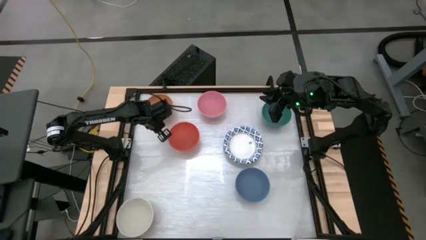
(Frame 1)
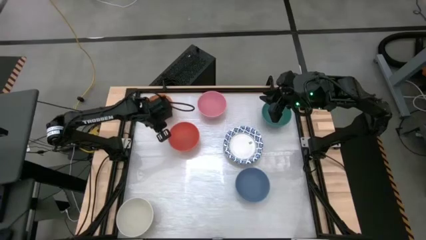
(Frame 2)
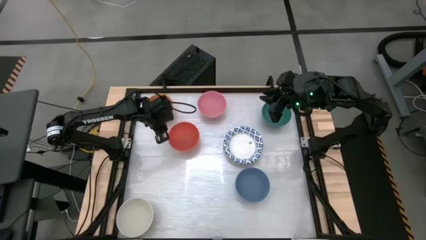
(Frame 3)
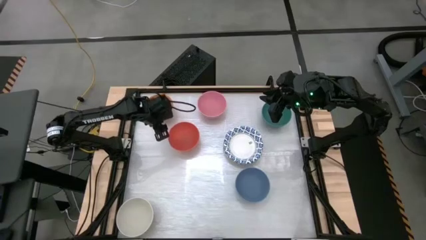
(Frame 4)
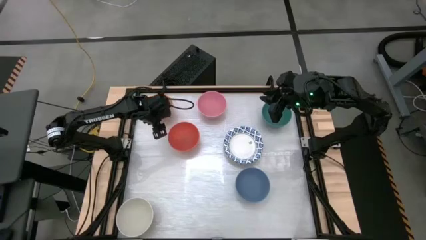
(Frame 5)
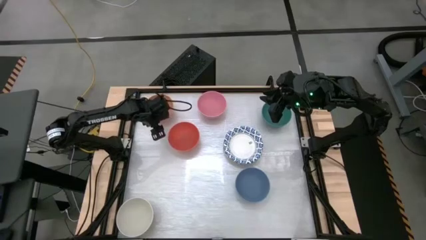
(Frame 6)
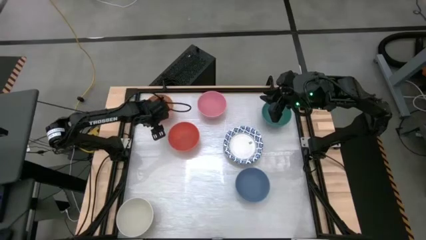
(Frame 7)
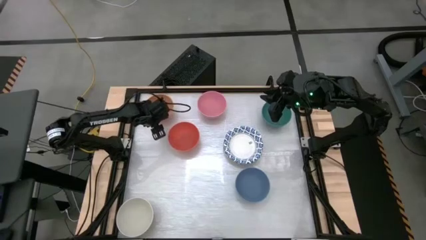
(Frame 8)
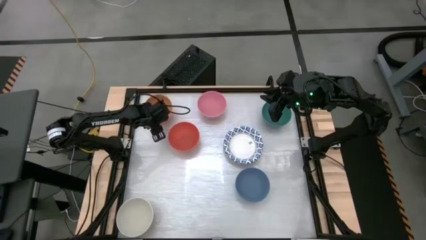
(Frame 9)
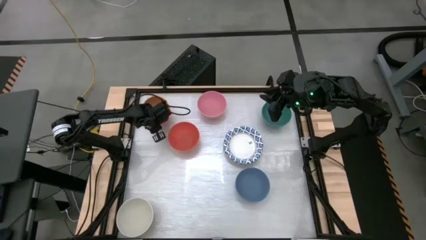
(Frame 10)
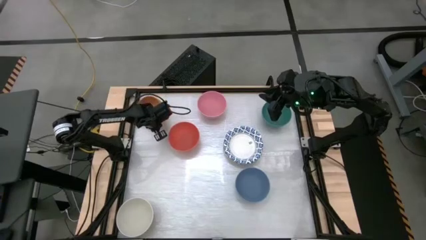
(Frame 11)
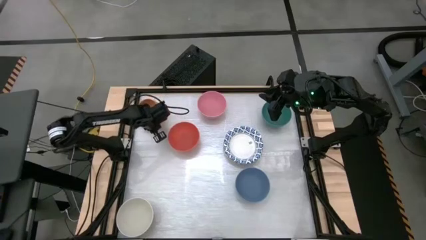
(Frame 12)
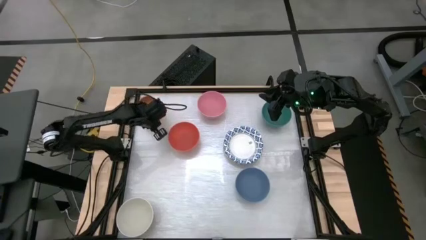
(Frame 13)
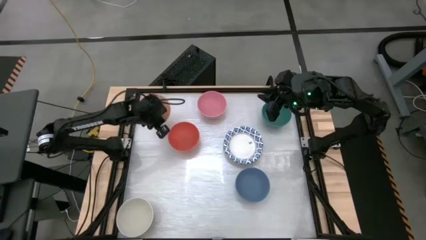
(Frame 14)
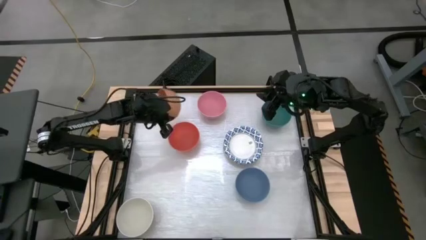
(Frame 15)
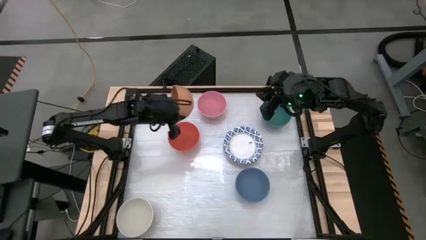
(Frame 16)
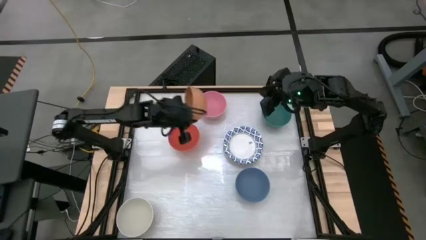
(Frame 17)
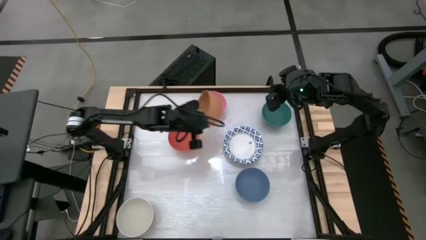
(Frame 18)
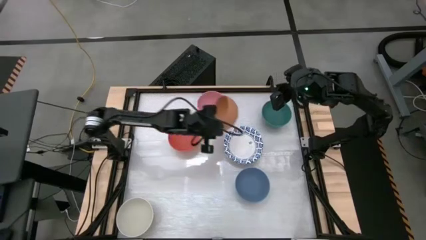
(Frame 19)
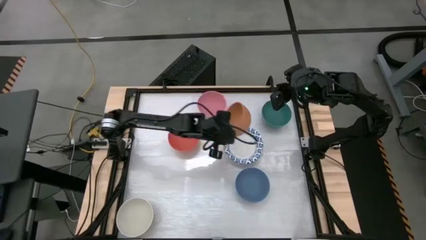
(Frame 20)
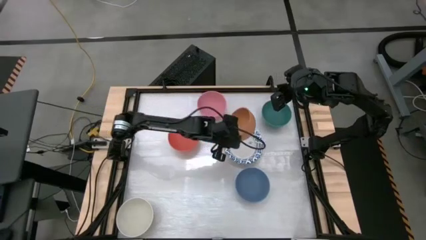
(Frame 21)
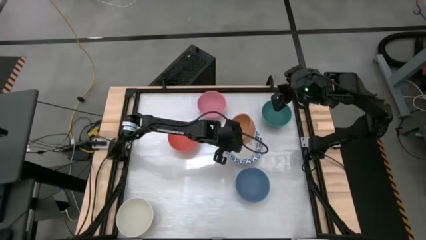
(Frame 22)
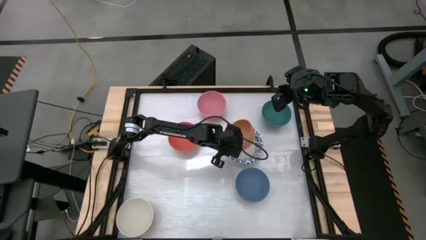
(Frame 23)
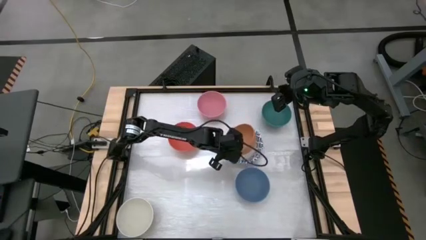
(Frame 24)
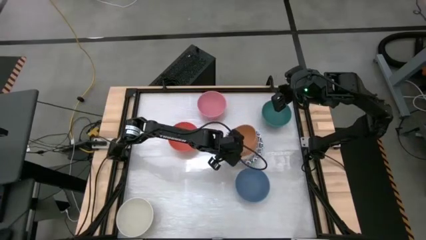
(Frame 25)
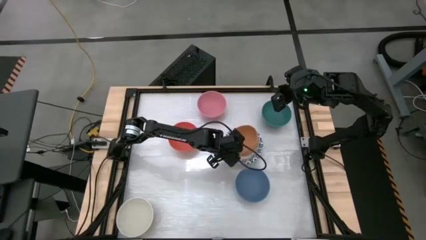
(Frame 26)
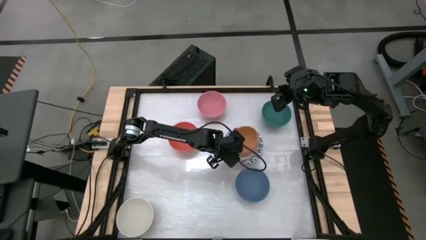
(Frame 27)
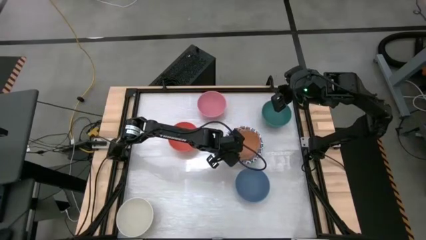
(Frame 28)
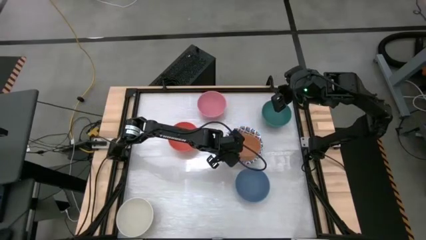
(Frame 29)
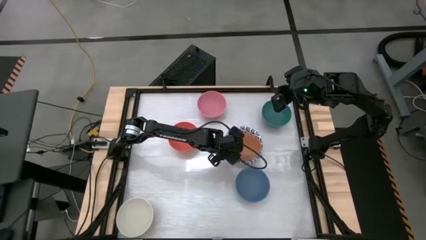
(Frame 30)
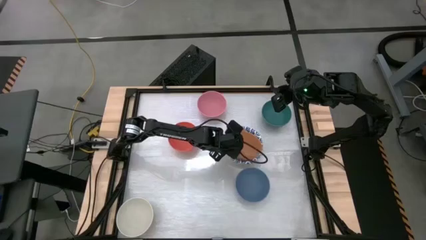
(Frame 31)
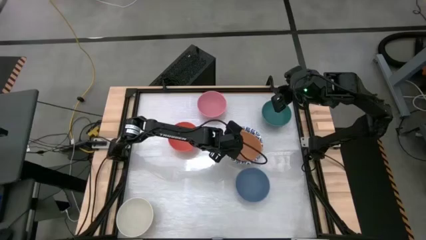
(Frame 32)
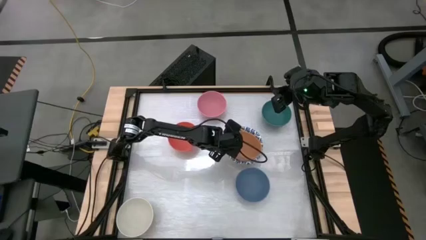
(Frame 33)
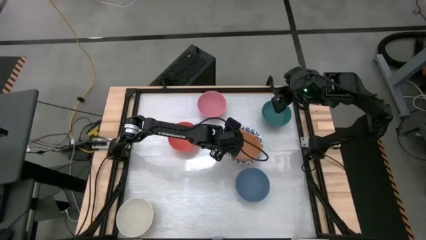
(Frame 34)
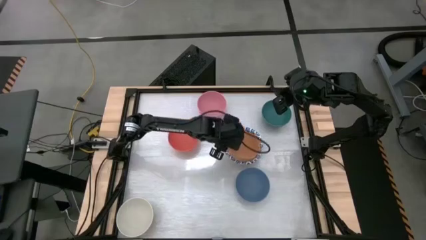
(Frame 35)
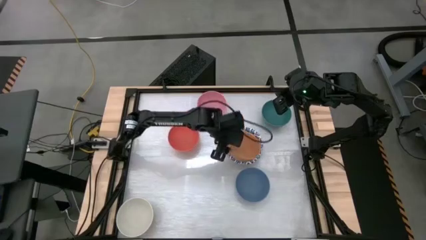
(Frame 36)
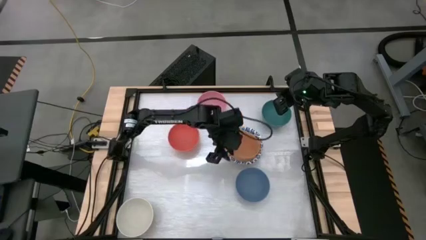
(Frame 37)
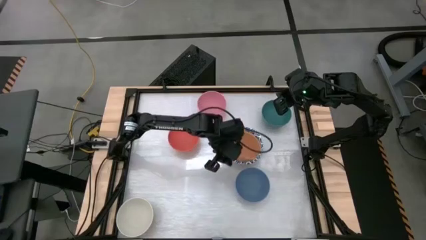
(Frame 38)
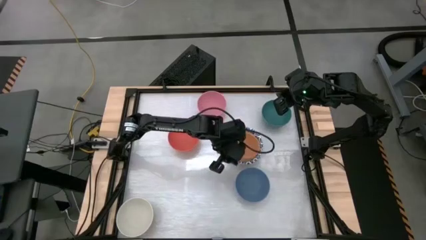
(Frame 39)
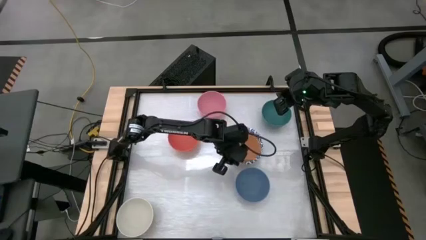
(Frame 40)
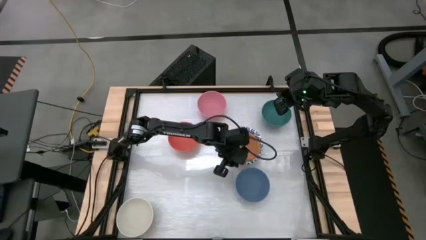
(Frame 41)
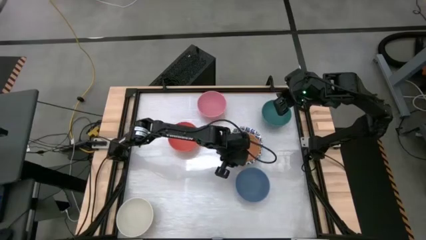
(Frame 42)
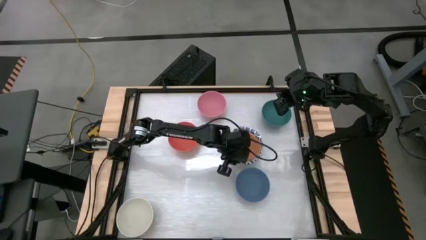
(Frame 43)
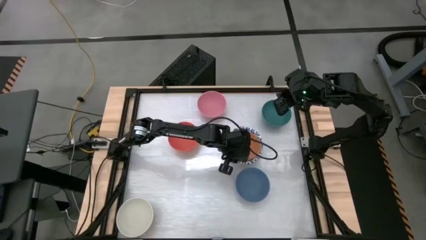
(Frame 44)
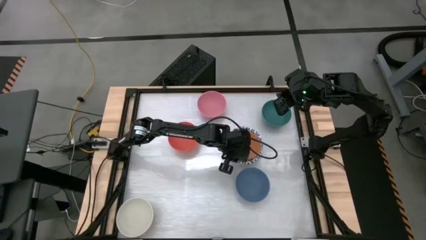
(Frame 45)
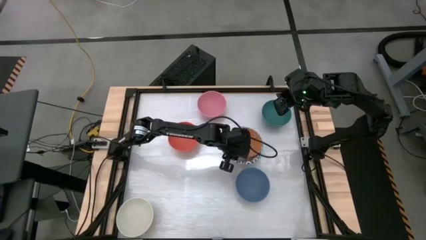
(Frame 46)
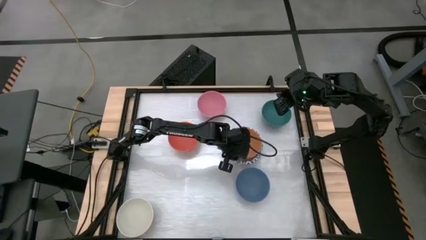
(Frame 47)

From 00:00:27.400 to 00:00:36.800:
Stack the brown bowl on top of the white patterned bowl

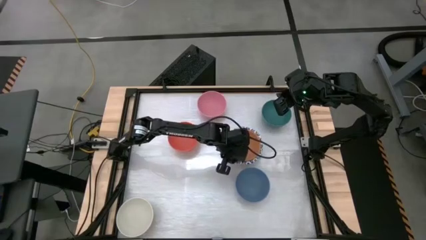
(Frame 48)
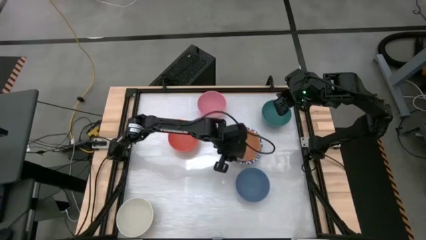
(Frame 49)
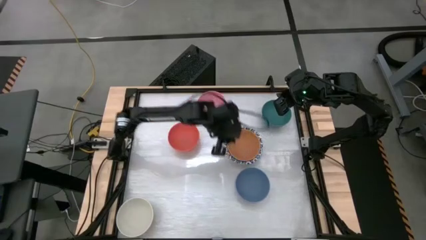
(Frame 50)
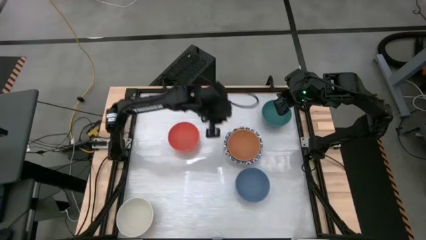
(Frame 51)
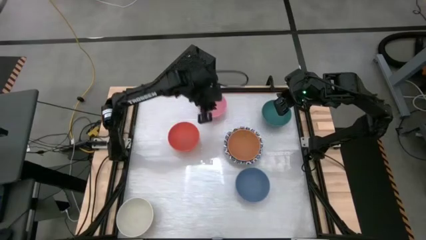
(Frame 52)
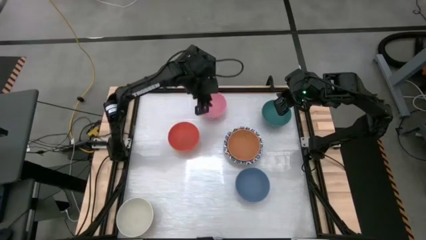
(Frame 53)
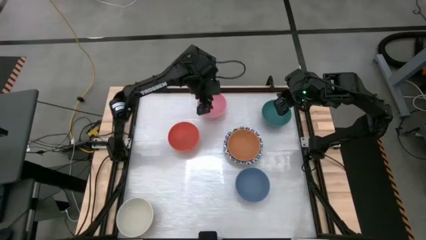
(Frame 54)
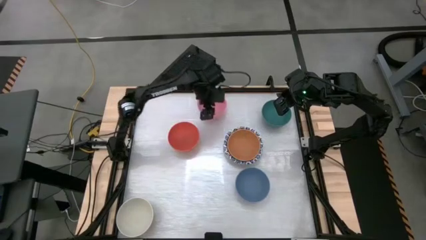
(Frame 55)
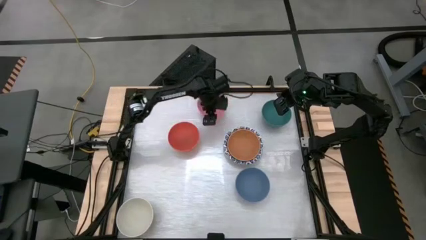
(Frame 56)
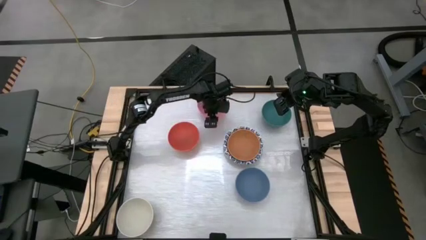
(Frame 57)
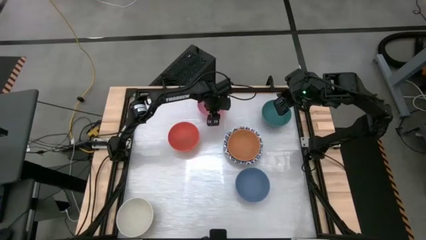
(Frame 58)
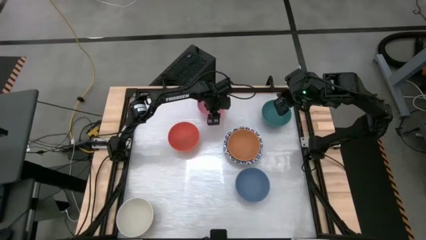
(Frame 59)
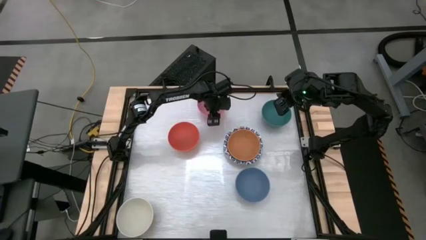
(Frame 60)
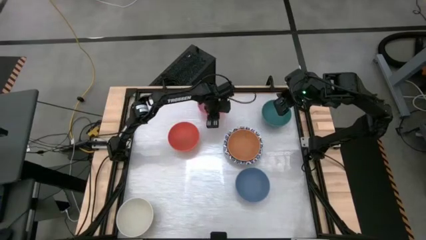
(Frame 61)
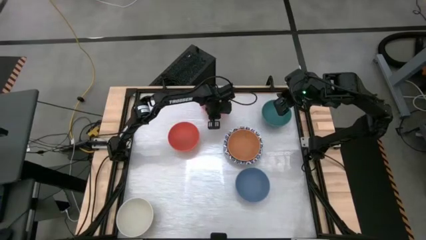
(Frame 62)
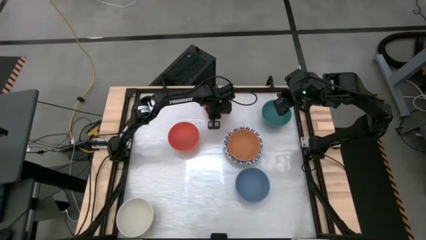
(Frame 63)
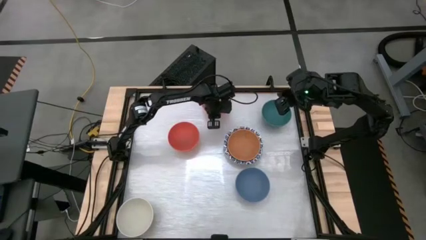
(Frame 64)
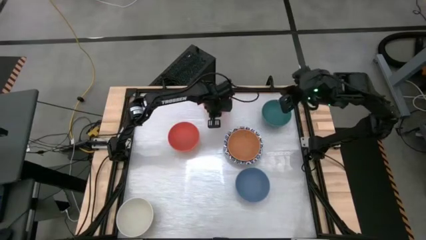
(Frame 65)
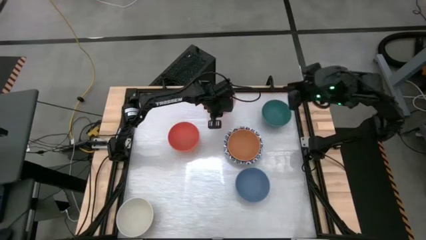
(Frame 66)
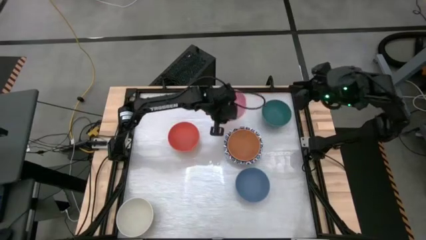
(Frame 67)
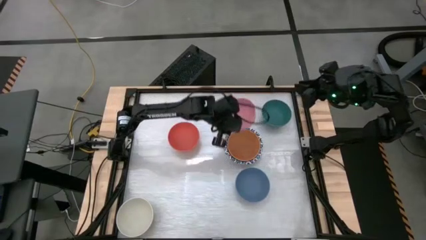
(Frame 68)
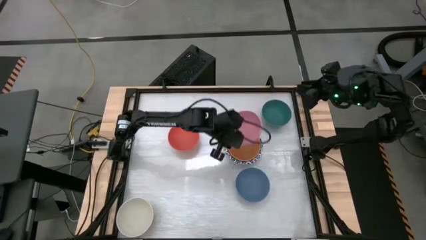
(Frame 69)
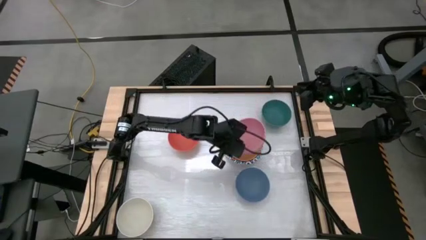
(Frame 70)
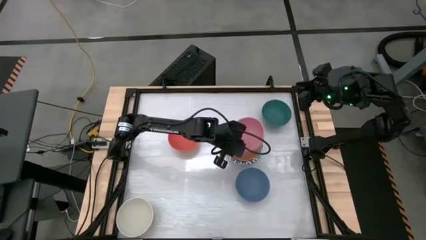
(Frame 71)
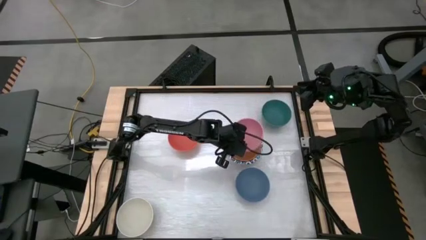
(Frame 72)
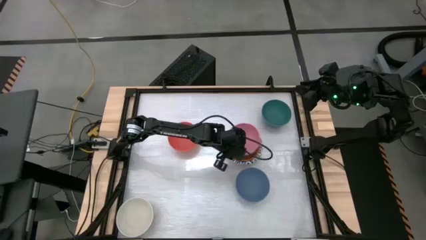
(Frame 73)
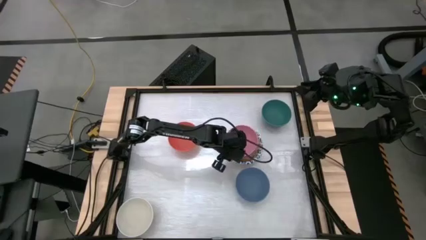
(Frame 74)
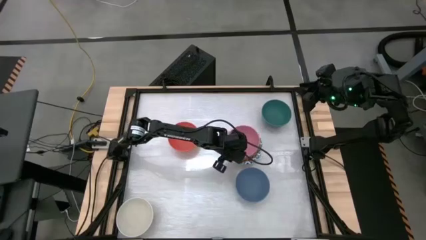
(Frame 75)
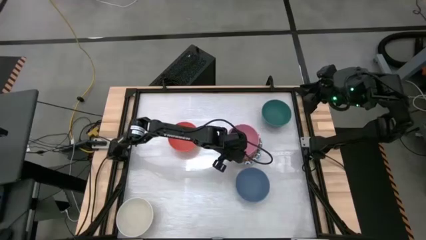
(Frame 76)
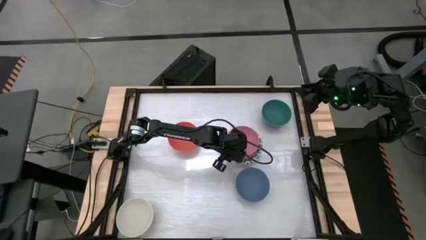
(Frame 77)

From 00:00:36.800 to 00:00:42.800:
Stack the pink bowl on top of the orange bowl

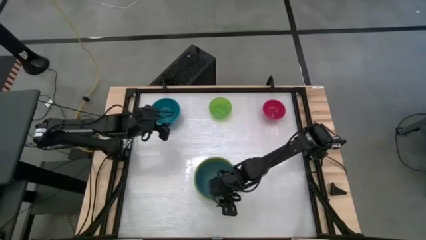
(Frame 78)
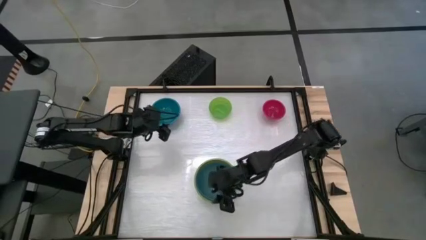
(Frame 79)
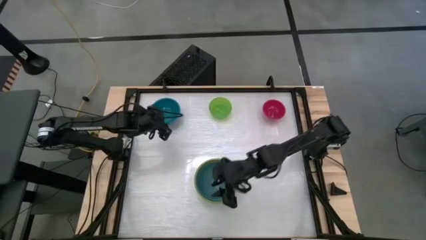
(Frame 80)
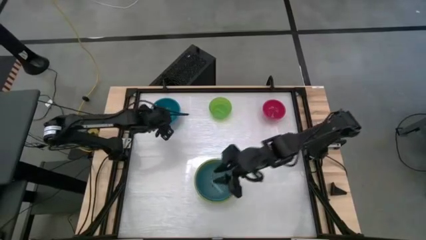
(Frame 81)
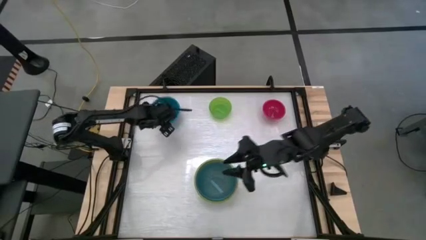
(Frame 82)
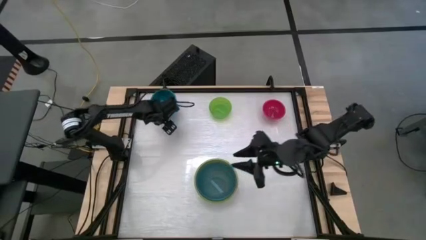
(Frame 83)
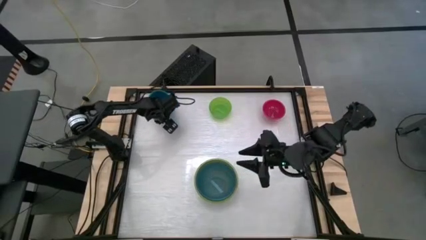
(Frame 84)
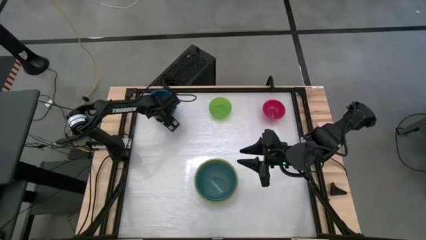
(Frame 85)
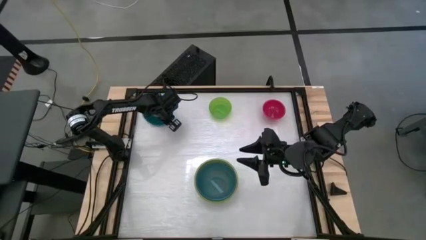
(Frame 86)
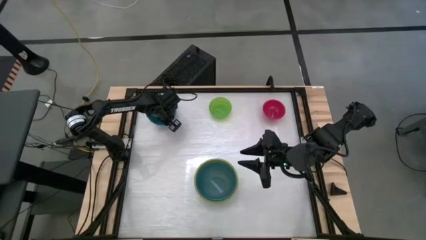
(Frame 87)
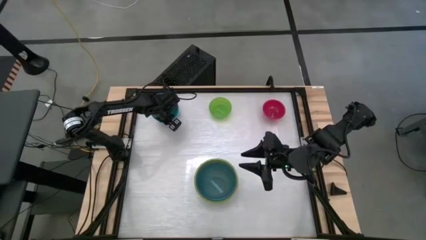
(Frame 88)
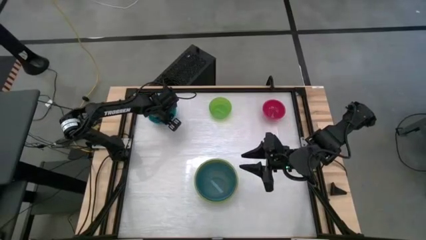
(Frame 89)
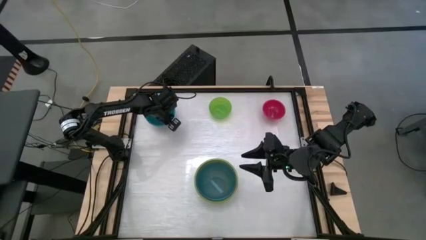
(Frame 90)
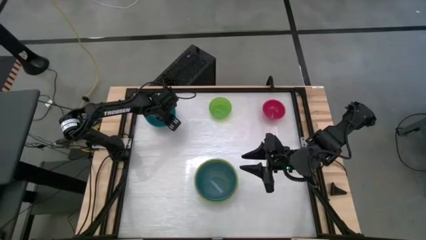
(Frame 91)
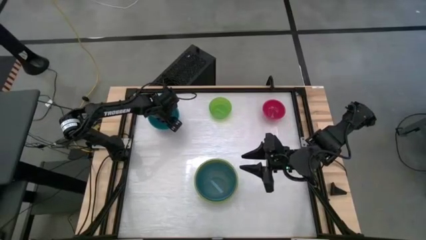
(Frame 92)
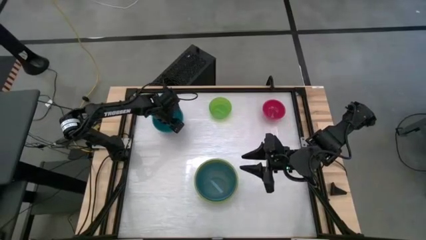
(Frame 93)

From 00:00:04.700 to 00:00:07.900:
Stack the dark blue bowl on top of the blue bowl
